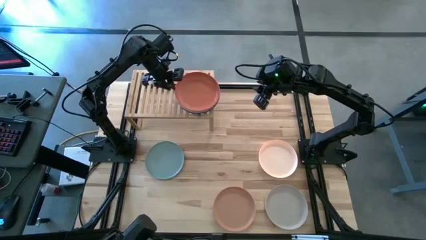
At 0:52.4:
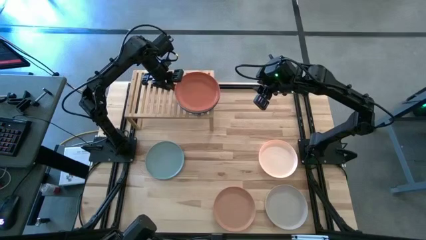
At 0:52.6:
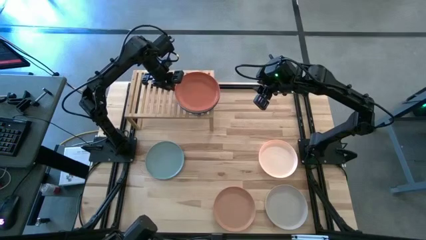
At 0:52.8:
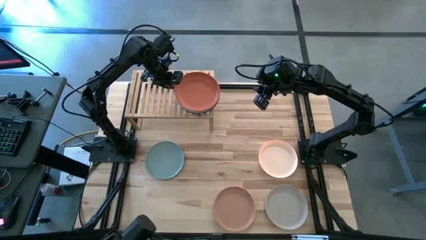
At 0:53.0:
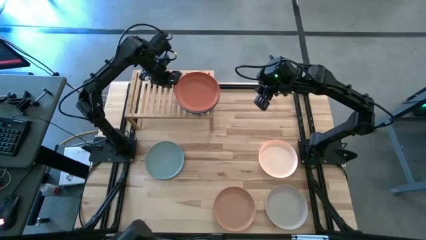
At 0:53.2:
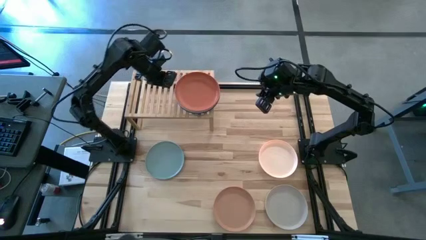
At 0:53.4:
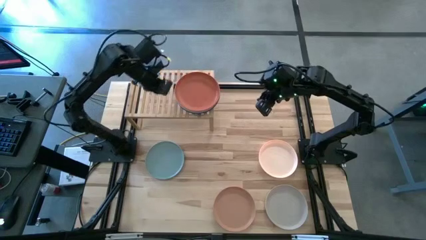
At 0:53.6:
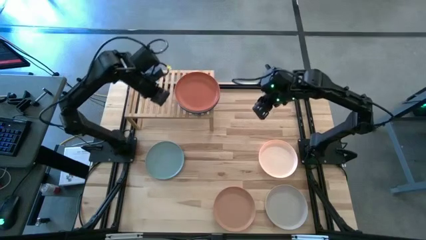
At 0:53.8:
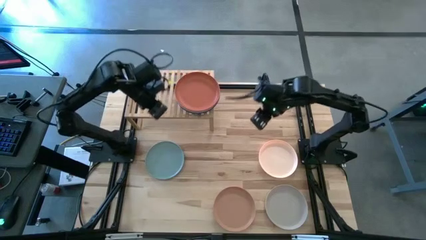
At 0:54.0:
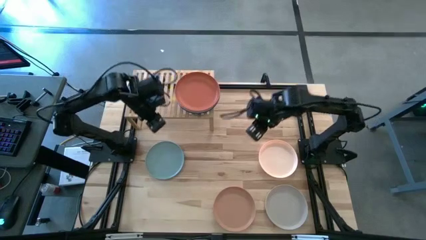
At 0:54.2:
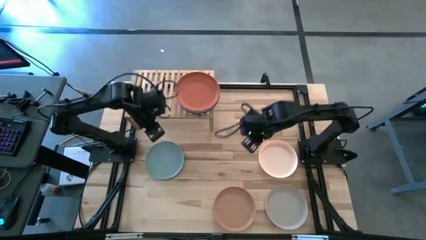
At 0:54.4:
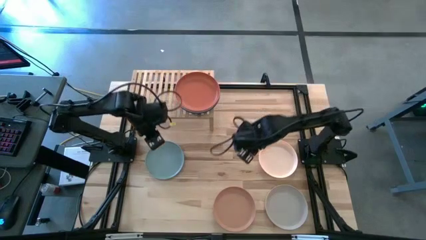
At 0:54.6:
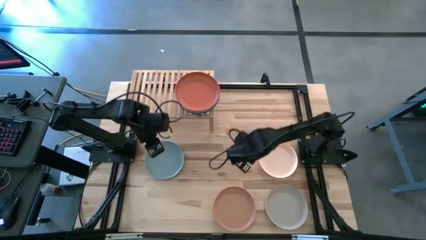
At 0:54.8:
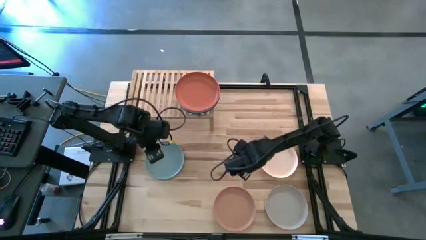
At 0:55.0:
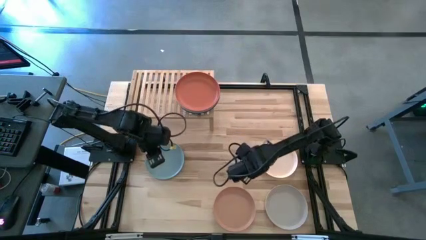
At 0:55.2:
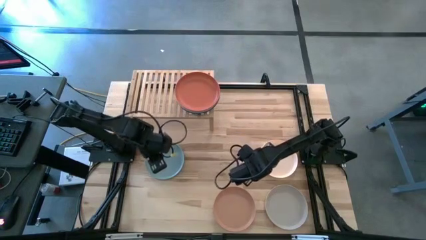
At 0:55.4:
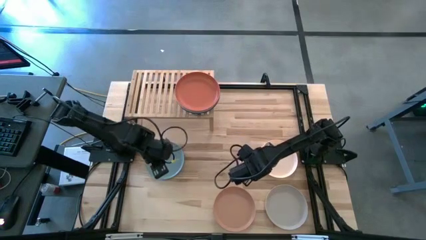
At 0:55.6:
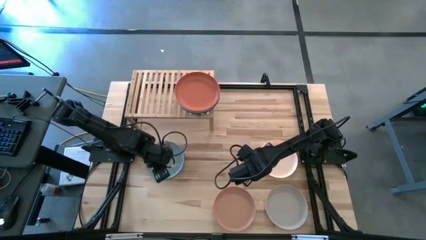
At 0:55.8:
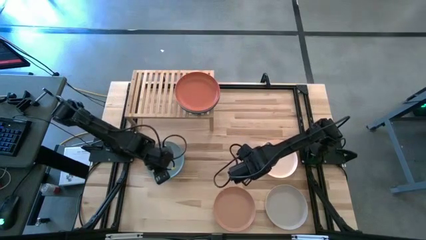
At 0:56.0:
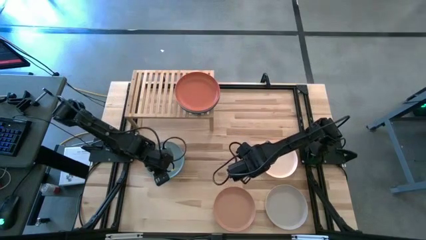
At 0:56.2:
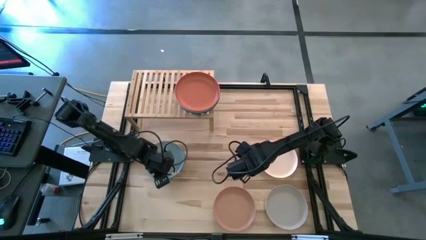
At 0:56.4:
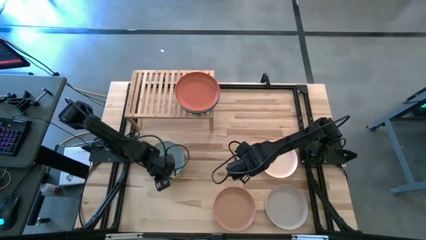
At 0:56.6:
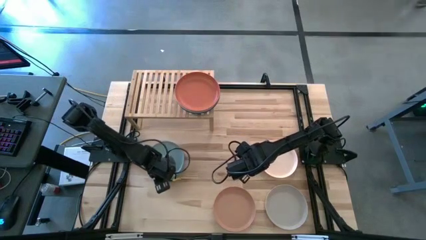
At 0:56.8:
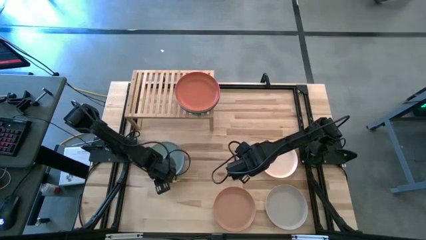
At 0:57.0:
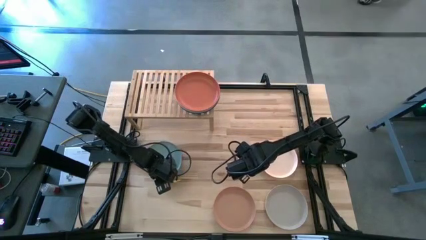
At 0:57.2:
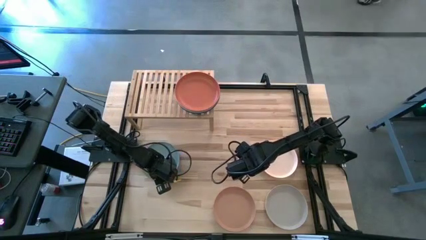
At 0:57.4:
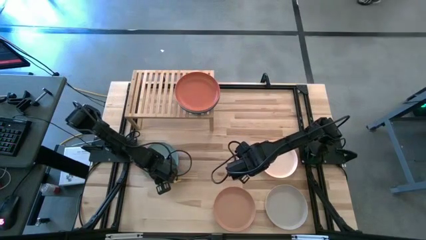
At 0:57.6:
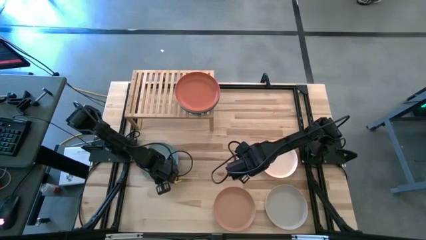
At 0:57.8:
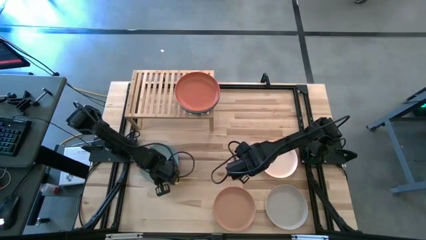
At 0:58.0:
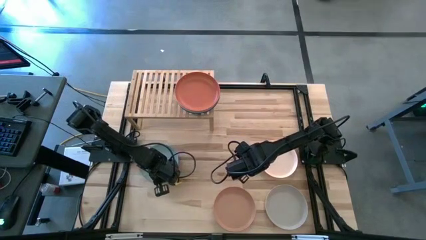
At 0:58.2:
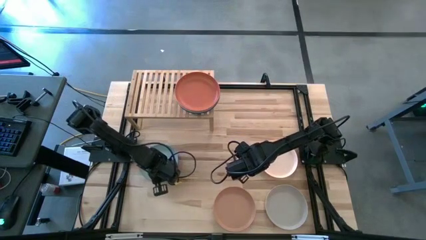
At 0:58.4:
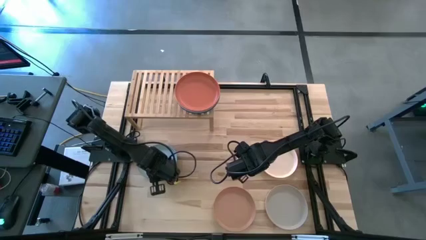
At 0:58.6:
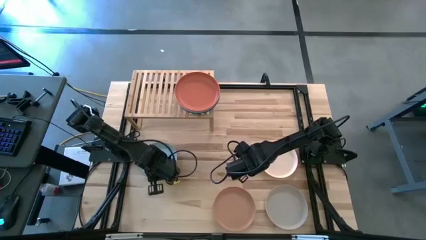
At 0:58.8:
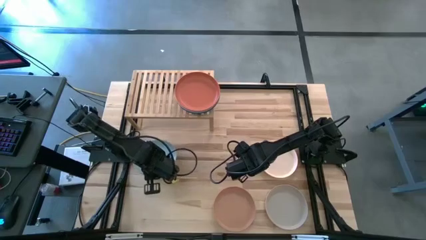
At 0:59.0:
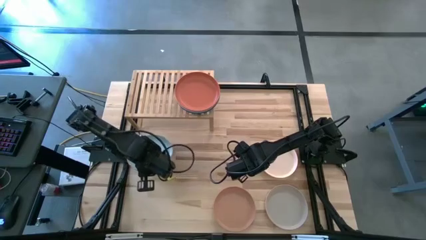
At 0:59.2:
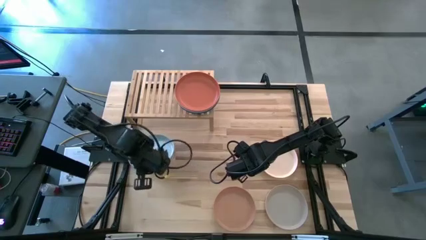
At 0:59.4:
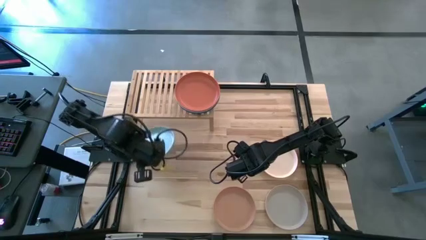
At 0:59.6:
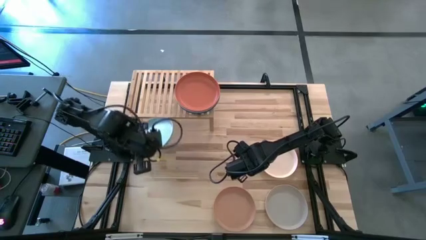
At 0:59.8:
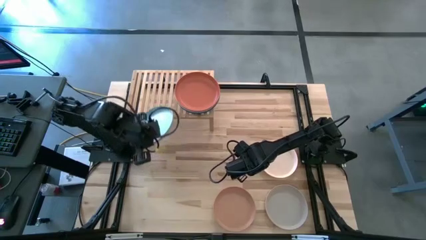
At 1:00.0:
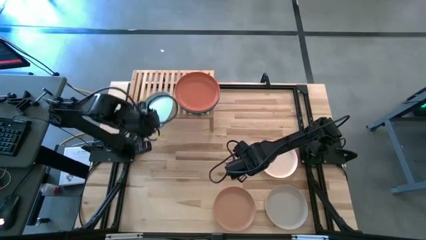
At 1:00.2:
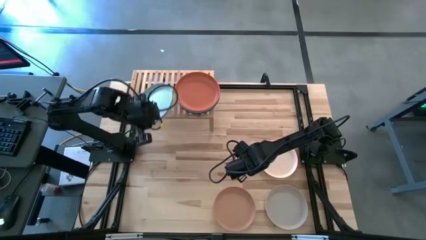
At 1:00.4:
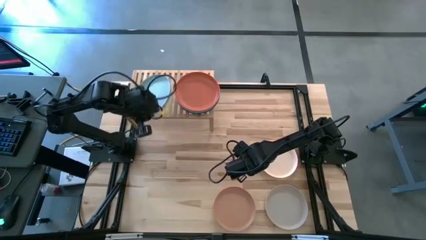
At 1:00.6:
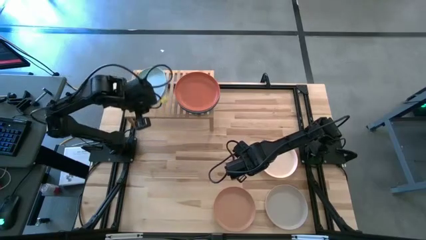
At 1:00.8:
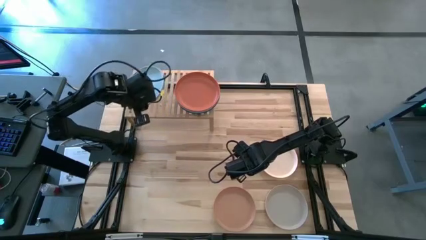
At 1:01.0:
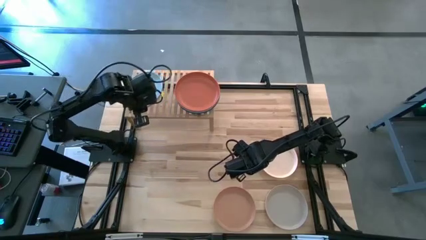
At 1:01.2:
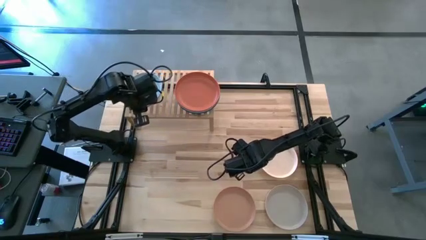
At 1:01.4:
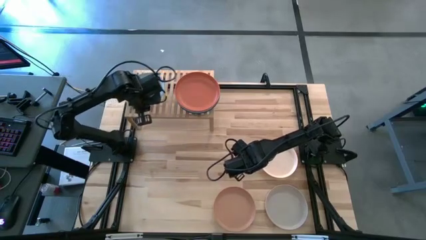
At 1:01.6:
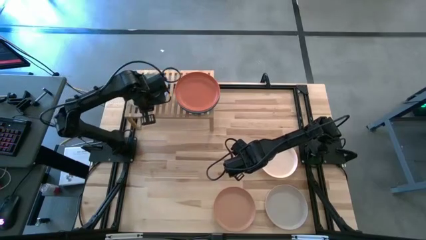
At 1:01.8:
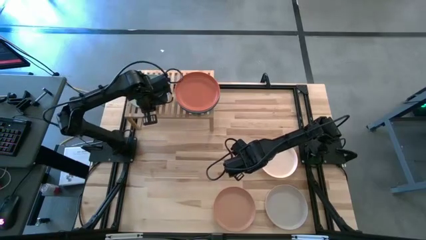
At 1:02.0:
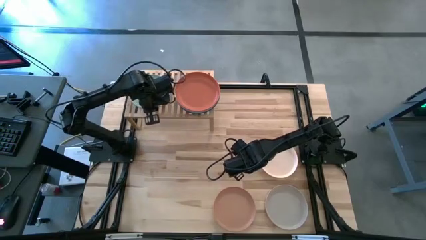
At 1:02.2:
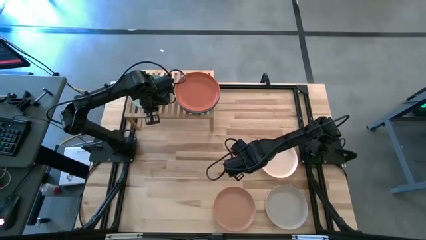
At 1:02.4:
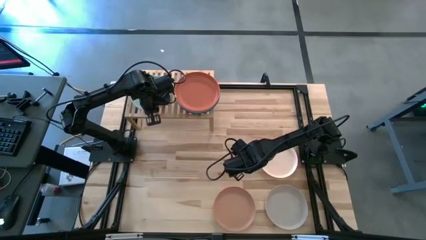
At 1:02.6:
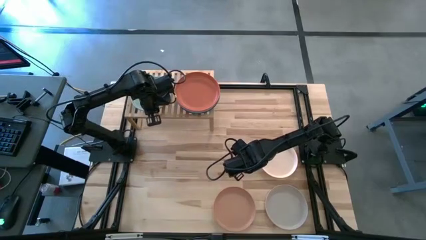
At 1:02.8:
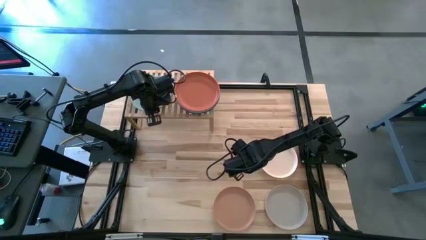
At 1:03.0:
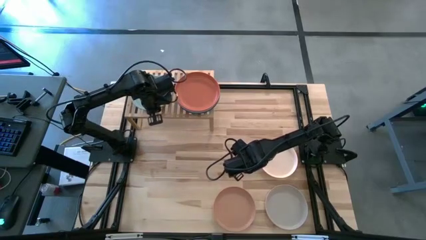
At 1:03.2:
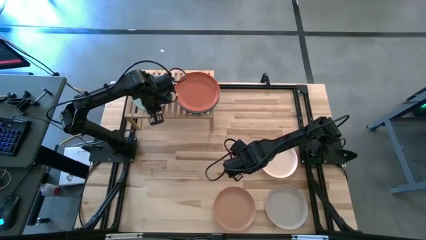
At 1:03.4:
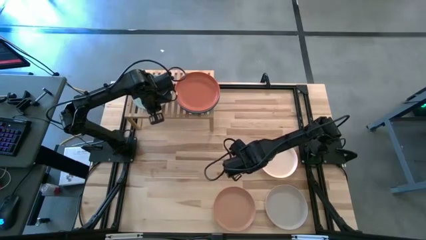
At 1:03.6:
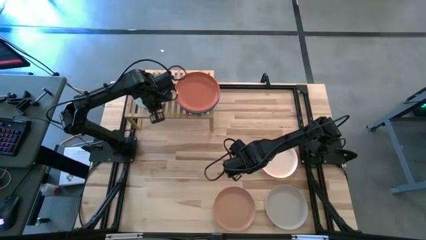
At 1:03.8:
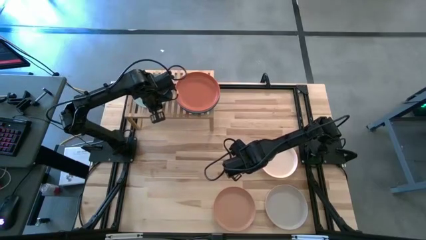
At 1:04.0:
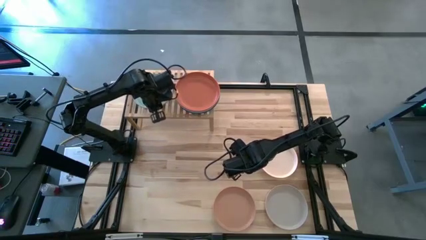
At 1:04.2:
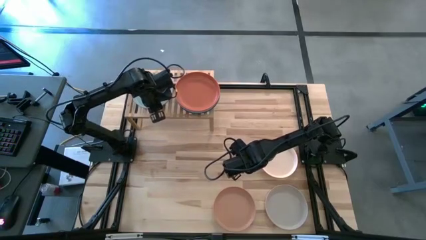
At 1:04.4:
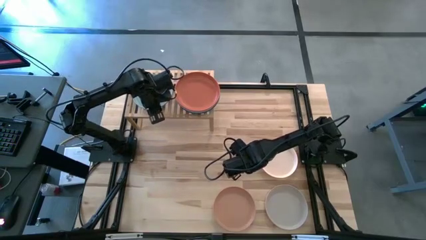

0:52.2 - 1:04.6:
Task: Place and stack plates onto a shelf
Put the light green plate on the shelf
